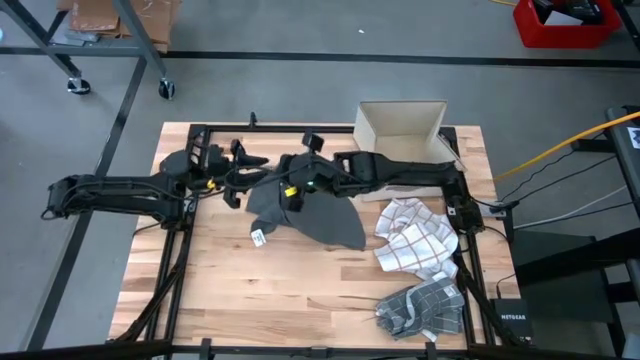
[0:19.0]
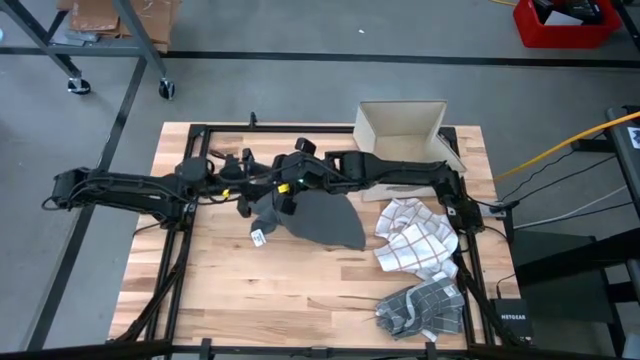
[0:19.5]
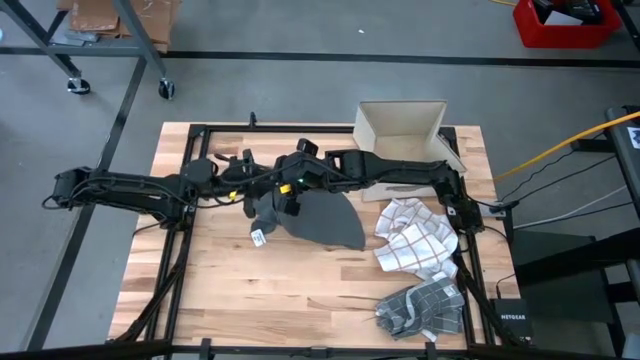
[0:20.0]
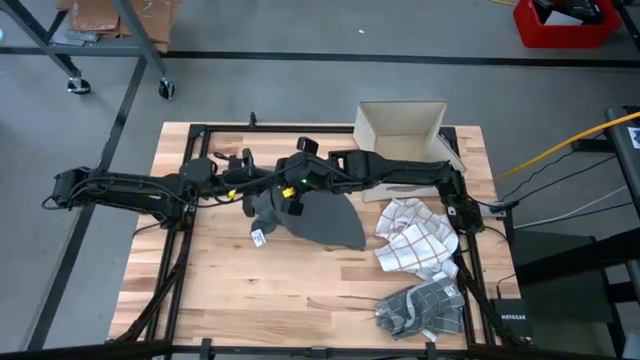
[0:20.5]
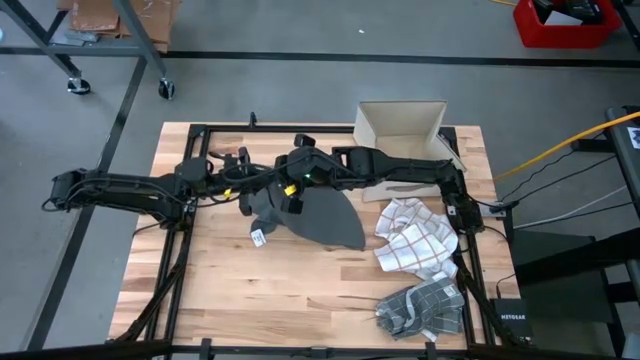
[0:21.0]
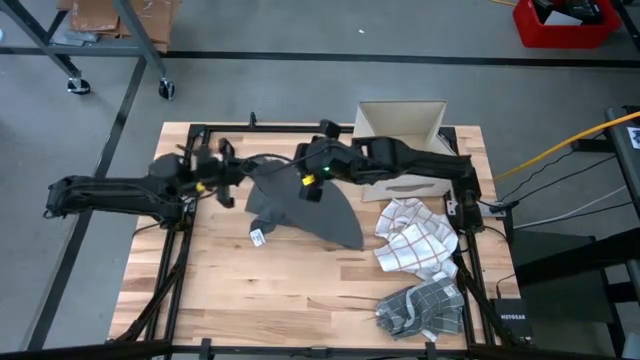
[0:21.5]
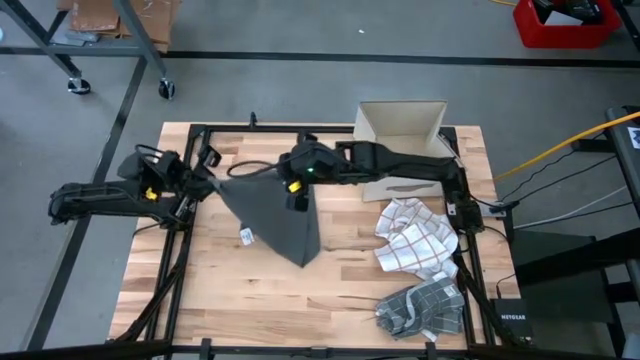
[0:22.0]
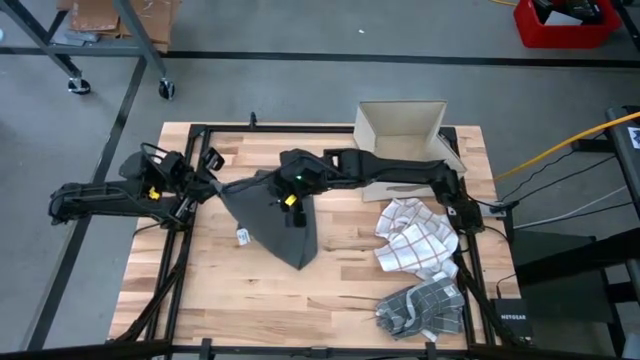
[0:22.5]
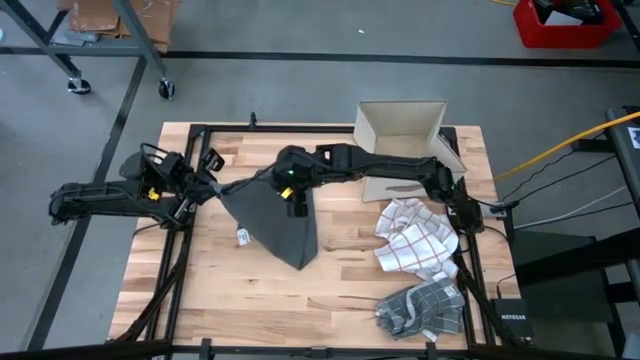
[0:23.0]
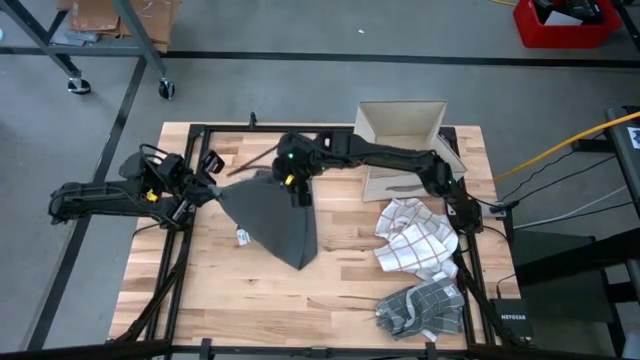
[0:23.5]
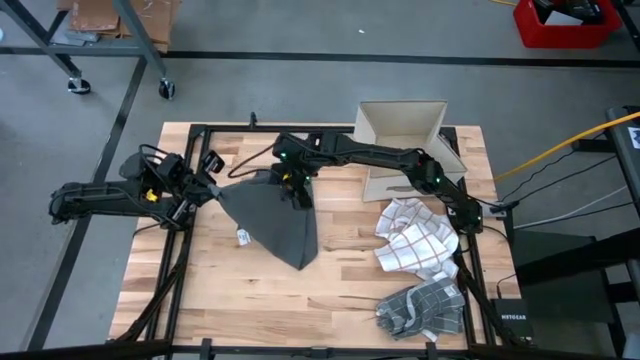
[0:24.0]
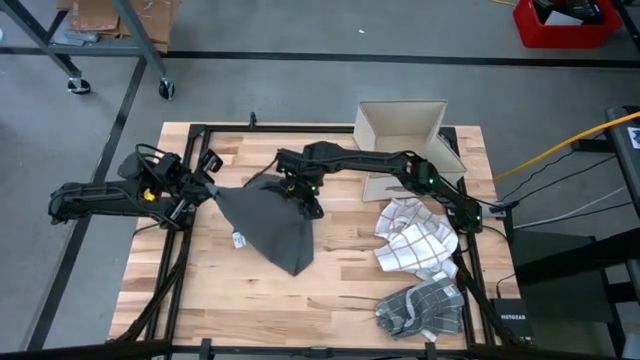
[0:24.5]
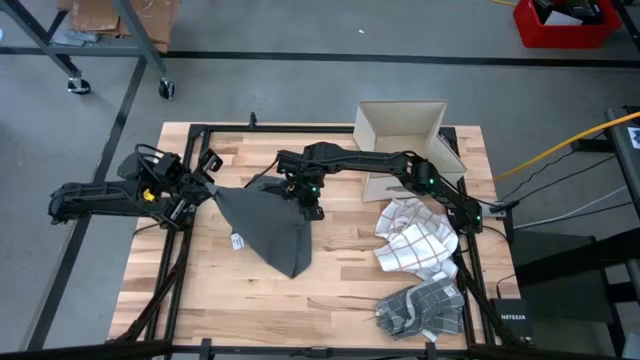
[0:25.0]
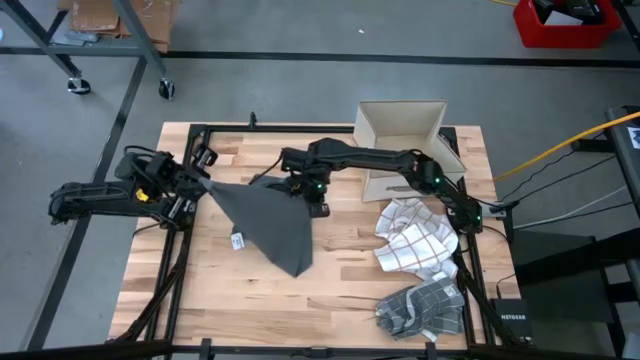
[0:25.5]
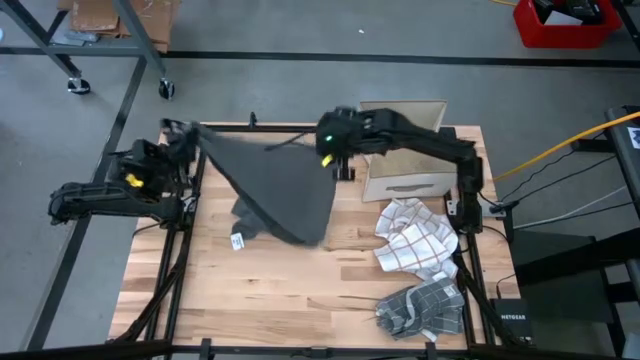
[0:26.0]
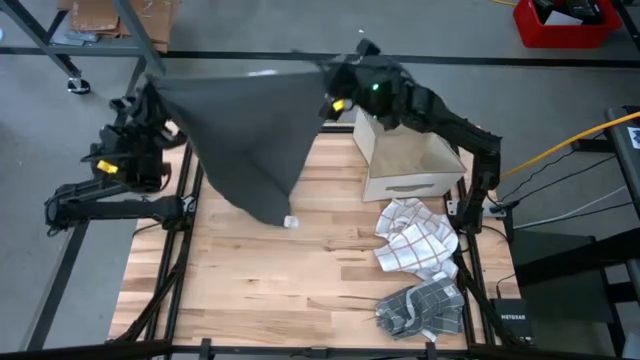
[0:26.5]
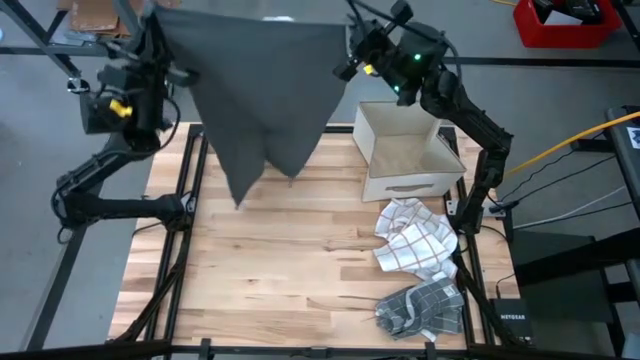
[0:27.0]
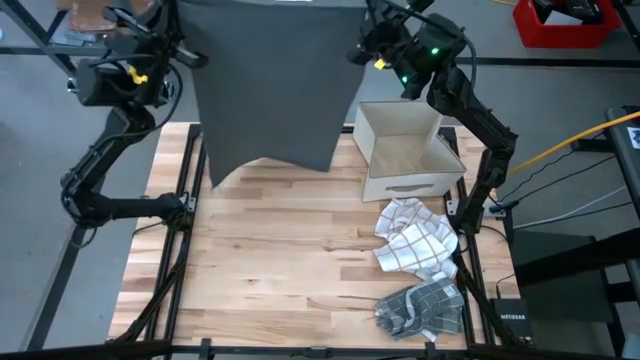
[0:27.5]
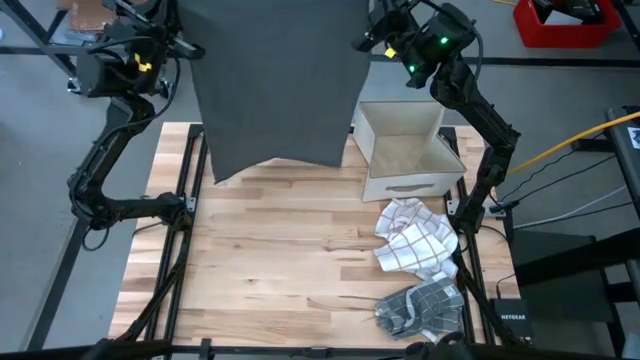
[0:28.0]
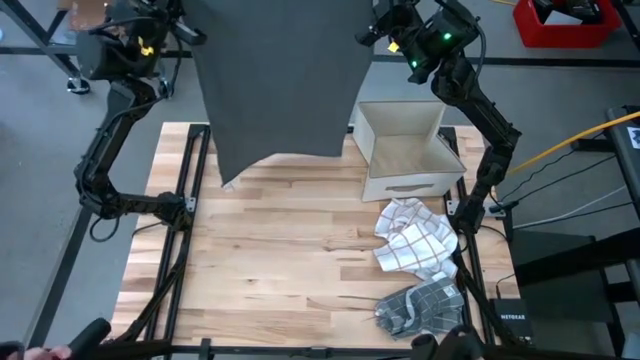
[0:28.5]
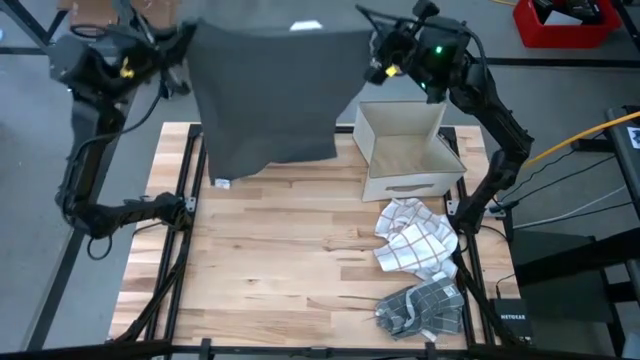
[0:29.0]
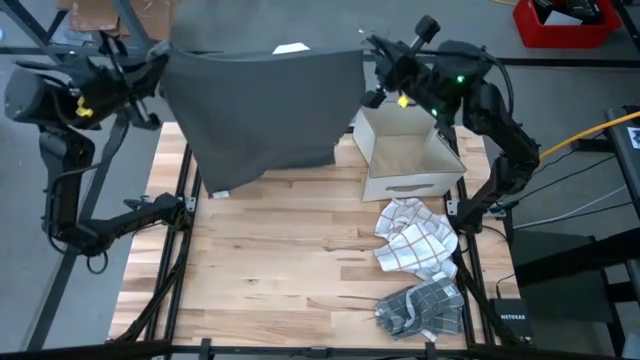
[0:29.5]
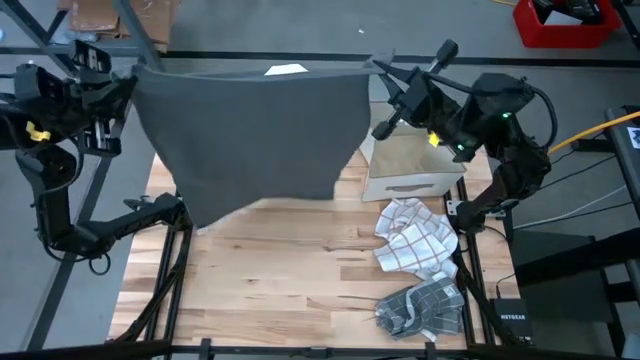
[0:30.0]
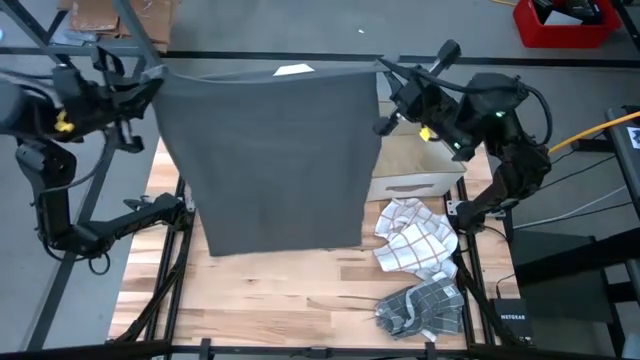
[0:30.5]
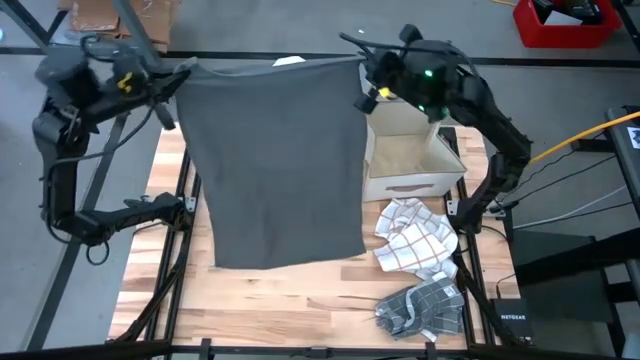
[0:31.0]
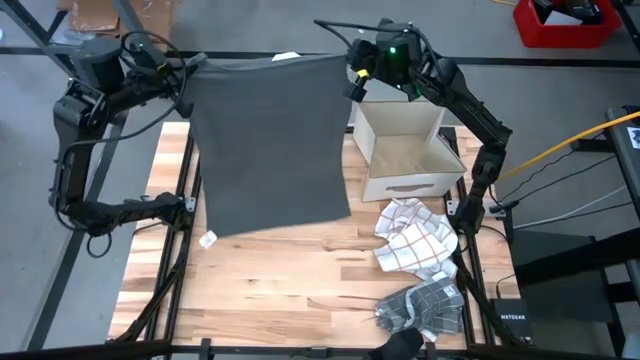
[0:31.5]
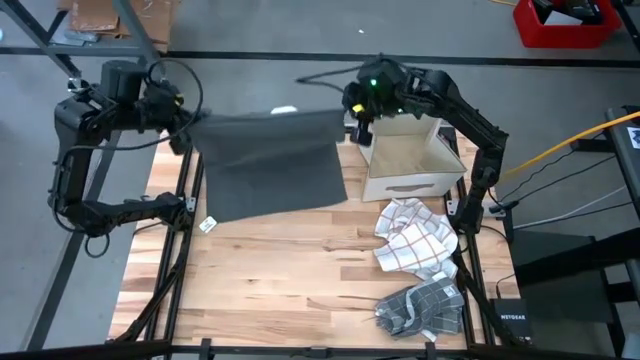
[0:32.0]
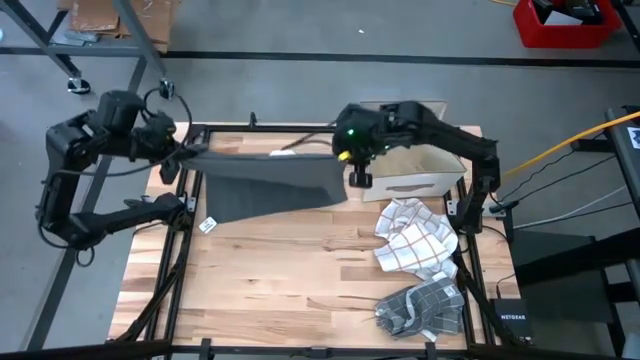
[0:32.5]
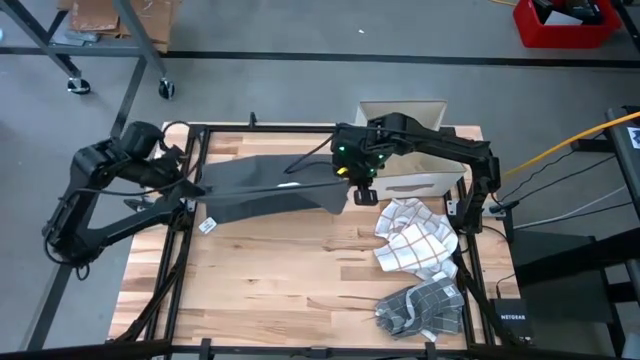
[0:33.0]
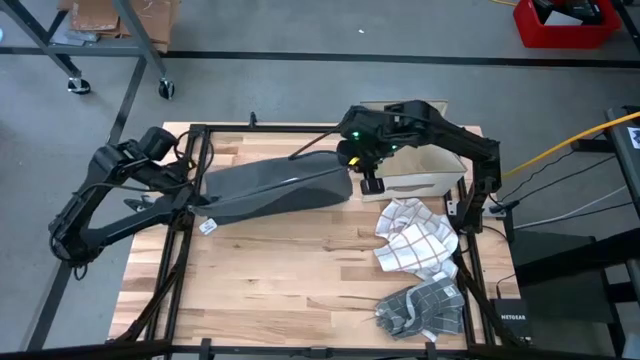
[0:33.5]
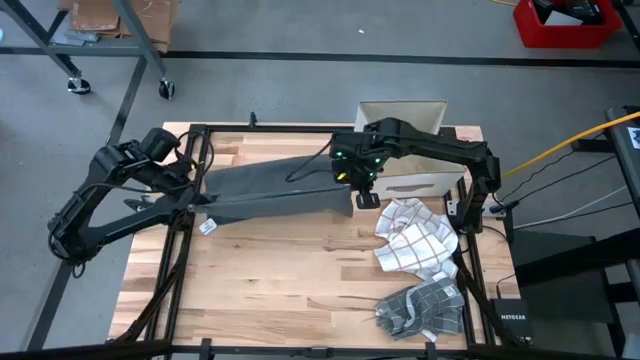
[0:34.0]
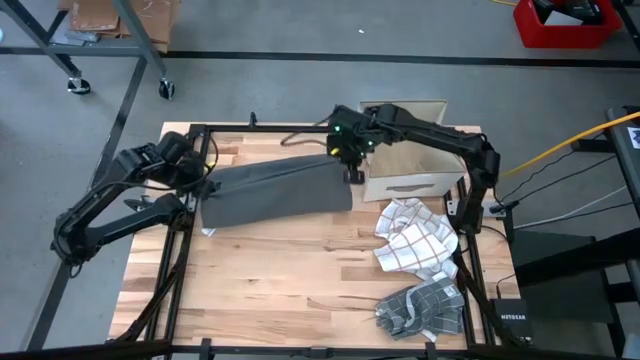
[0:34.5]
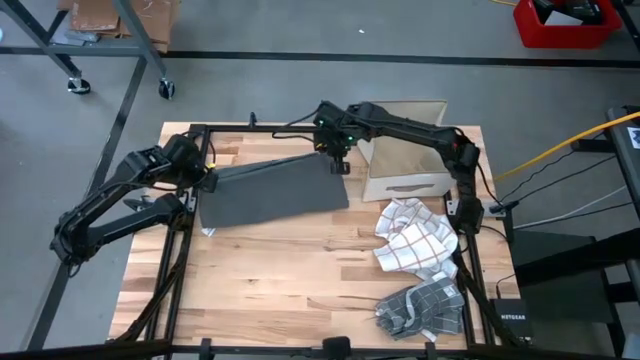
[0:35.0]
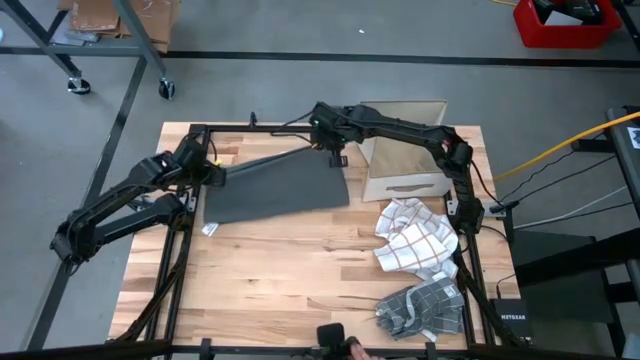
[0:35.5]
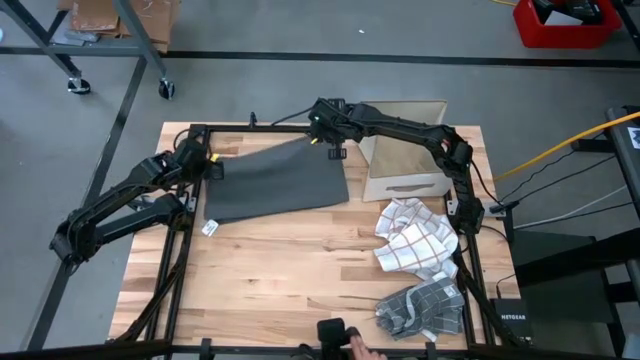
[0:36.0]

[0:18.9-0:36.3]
Task: Fold towel
Fold the gray kitchen towel

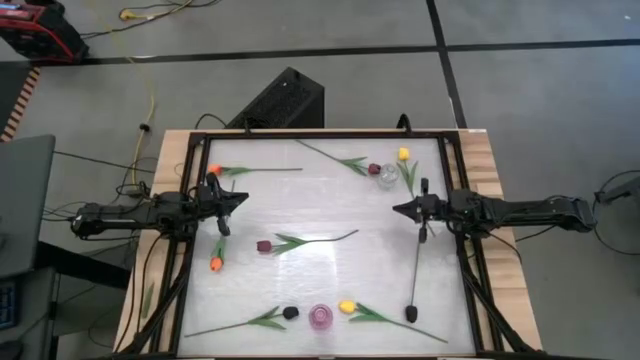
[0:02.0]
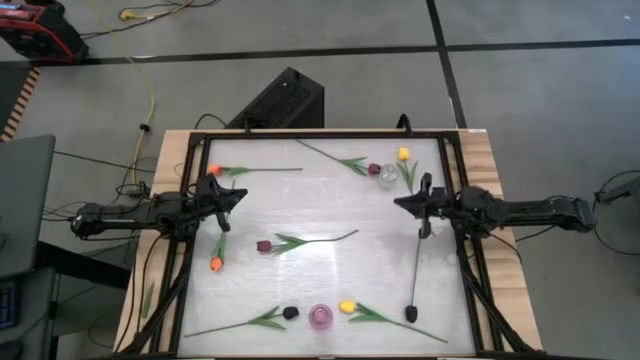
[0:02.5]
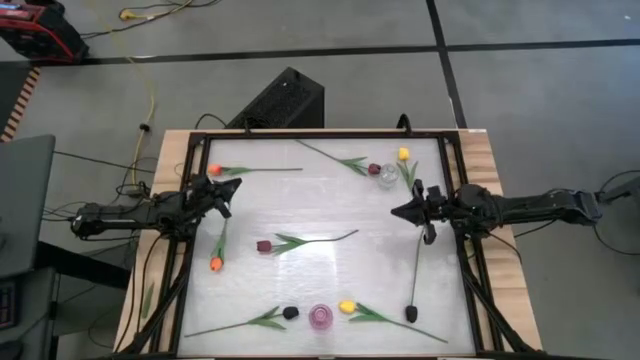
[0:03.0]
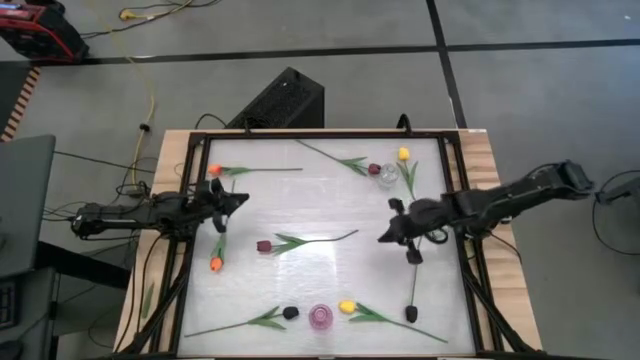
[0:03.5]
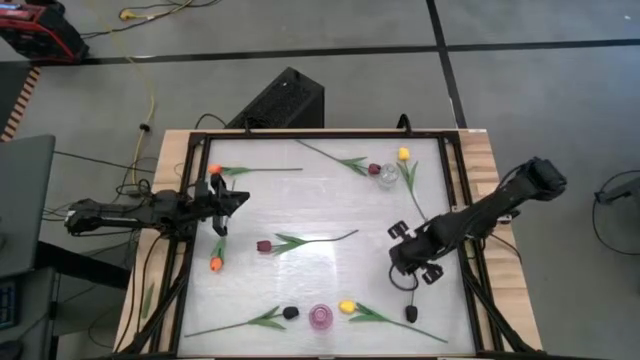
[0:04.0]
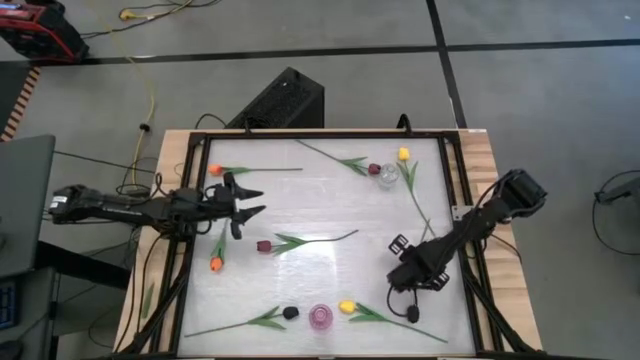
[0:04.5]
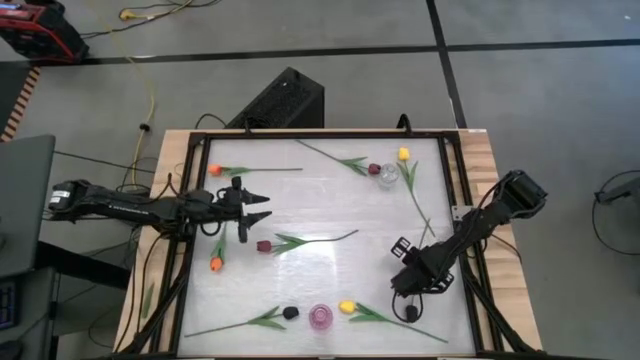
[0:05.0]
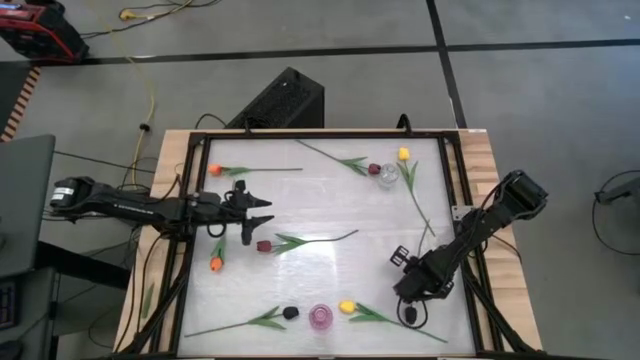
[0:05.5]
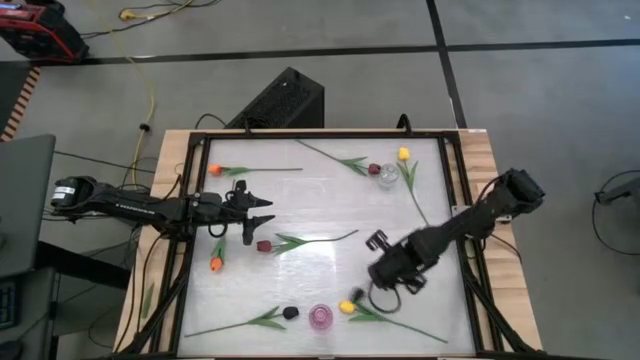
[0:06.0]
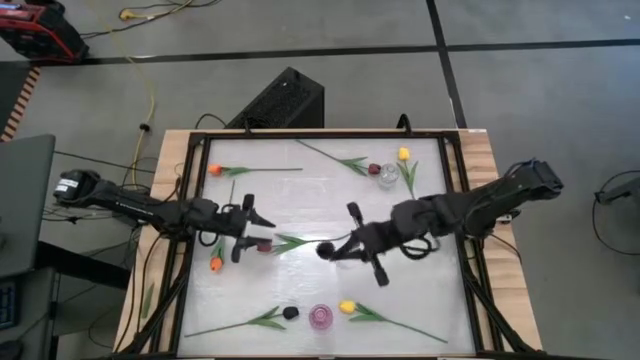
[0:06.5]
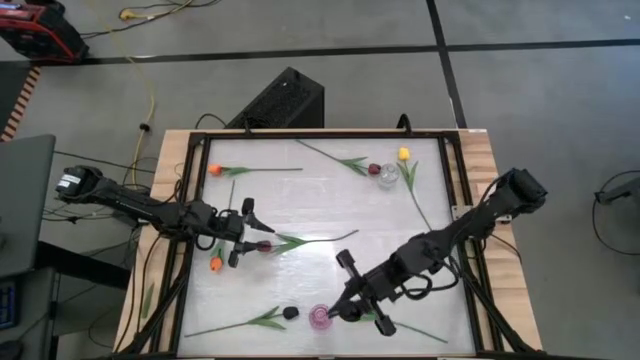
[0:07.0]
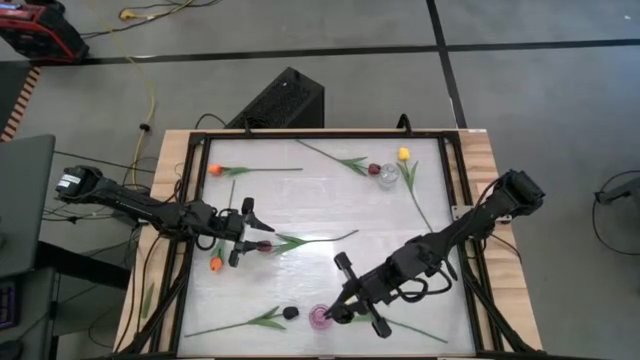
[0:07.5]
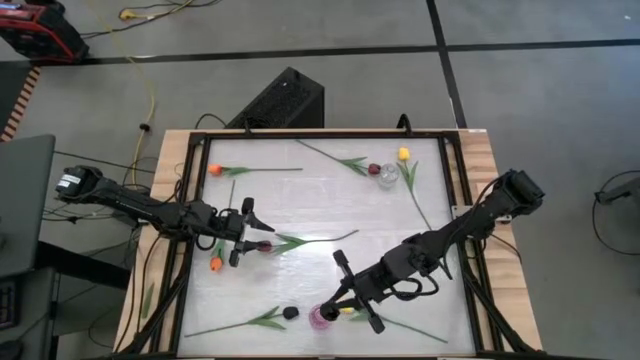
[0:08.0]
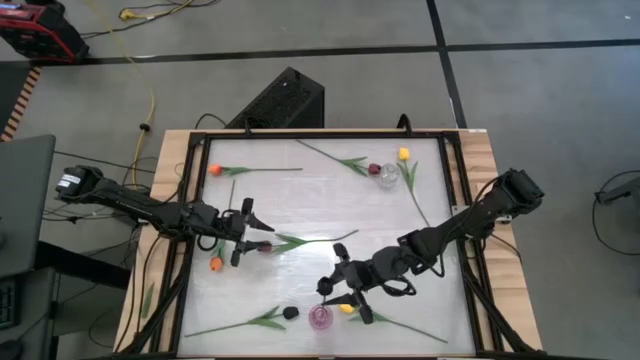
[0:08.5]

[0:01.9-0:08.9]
Task: Sort flowers into vase by color
Put the right black tulip into the pink vase
